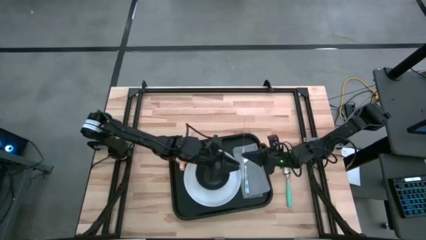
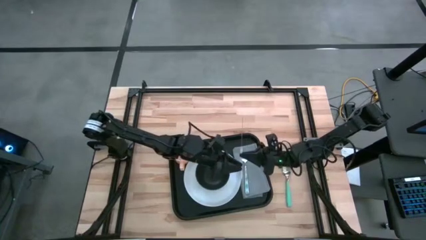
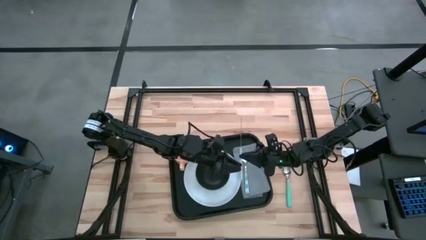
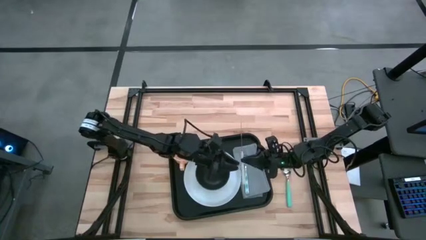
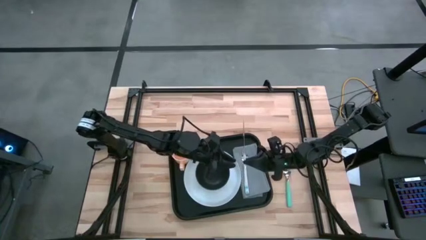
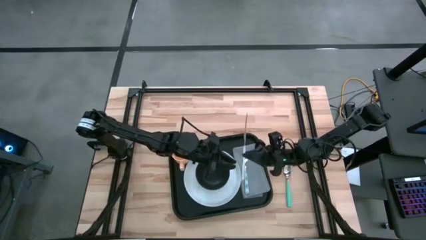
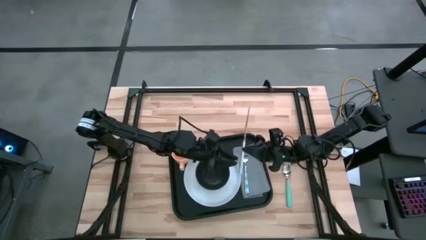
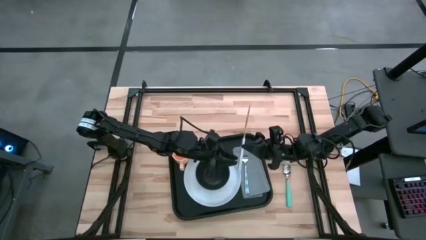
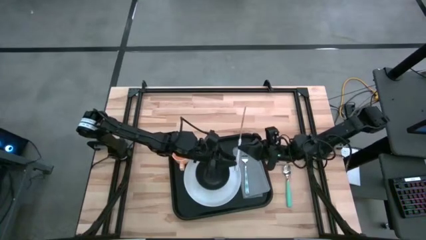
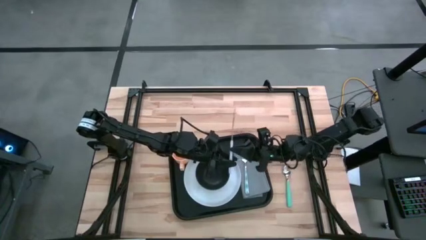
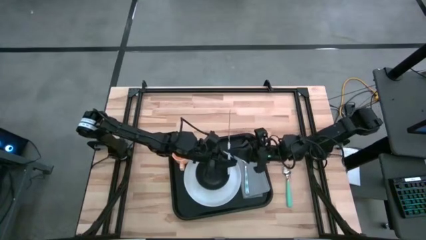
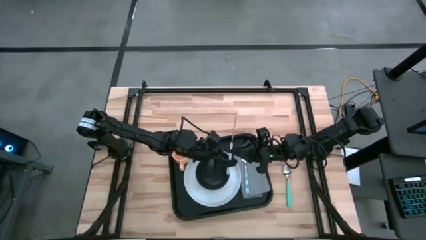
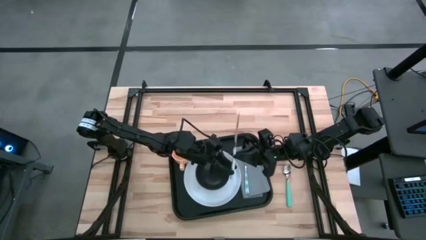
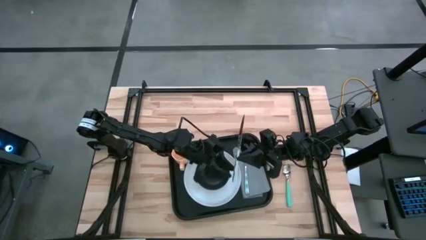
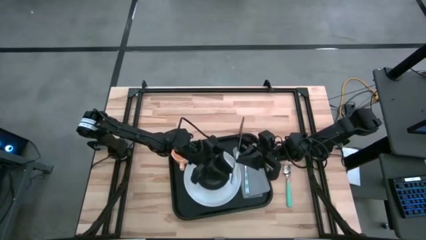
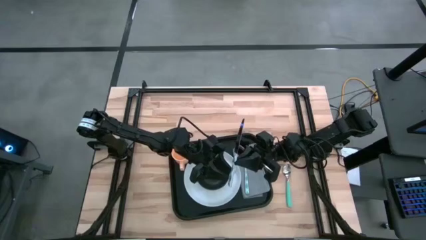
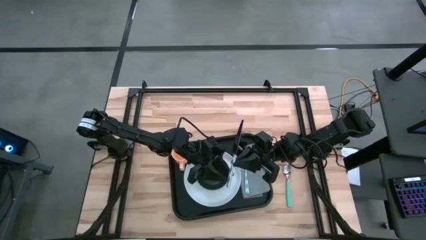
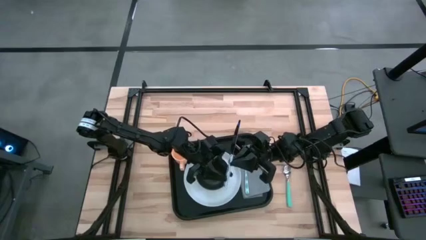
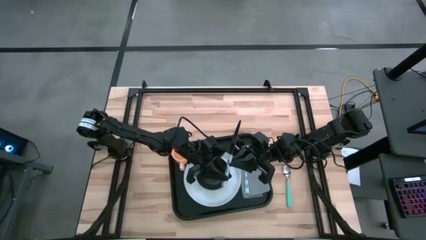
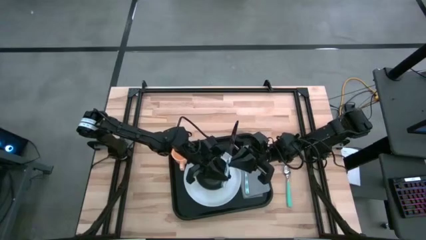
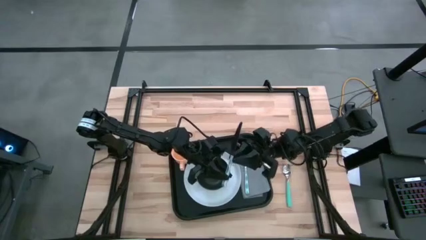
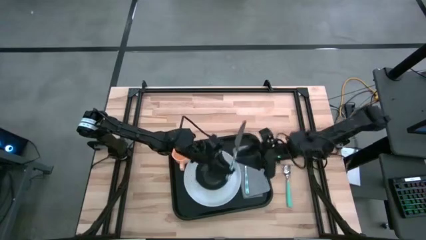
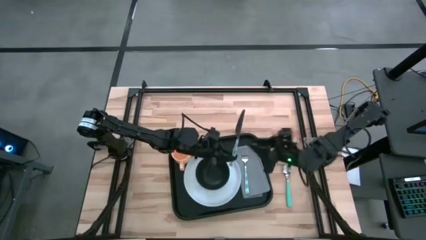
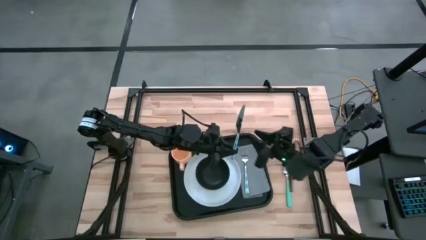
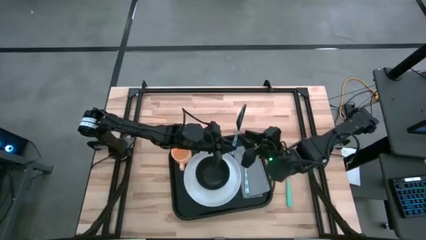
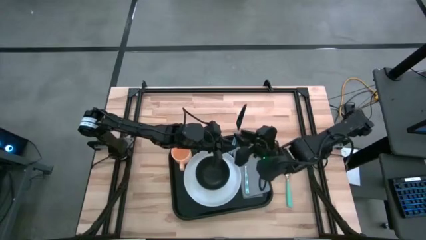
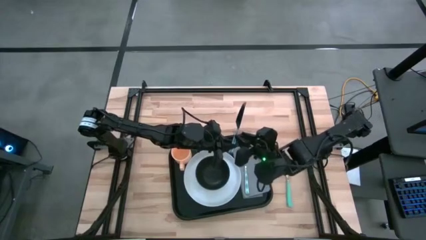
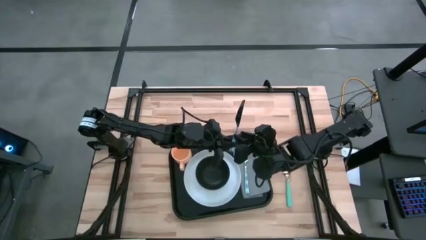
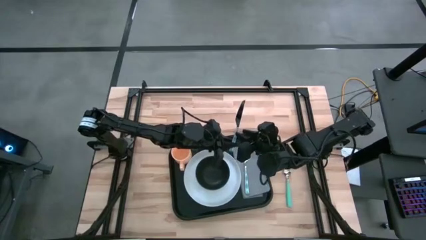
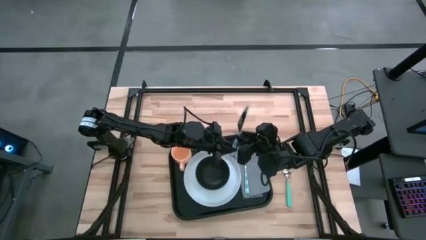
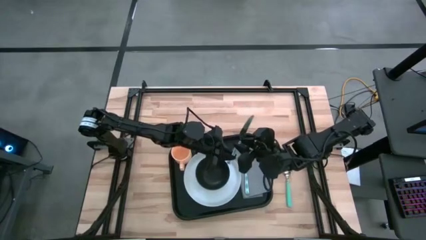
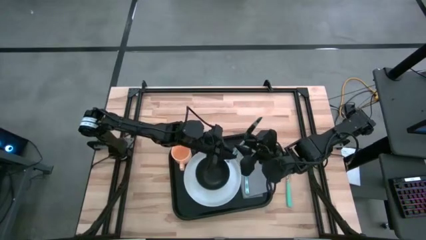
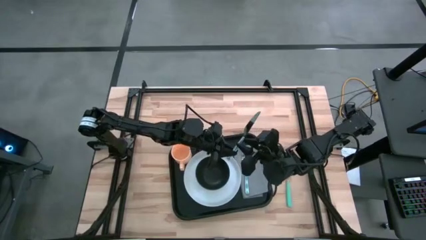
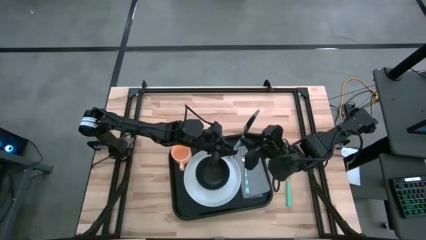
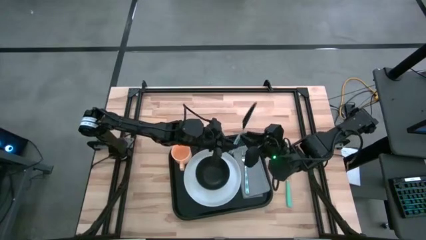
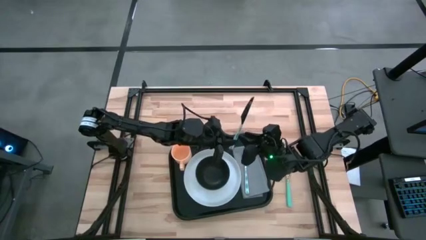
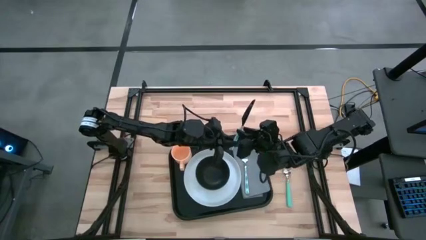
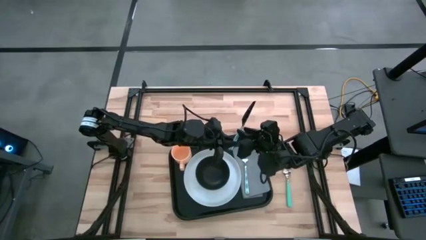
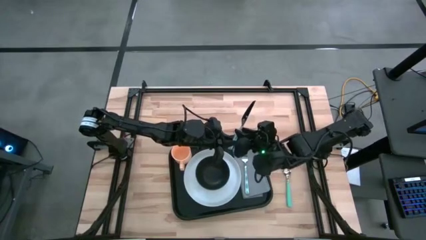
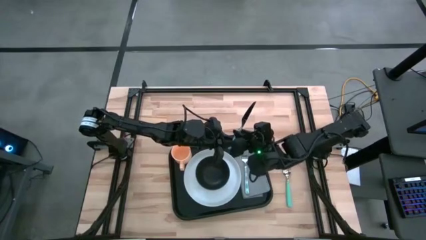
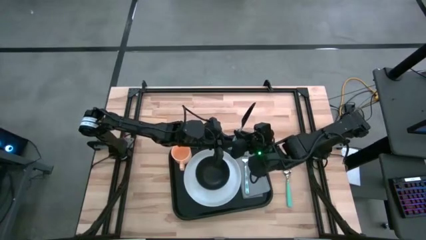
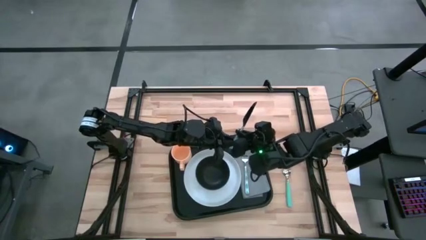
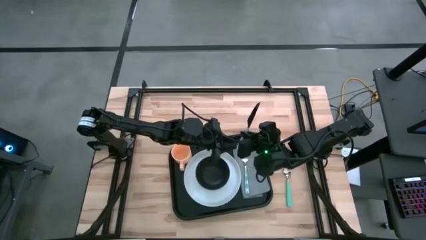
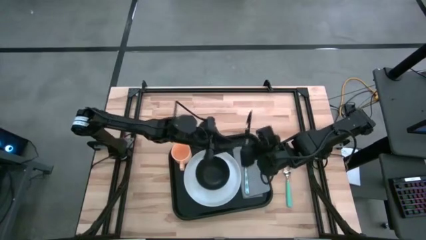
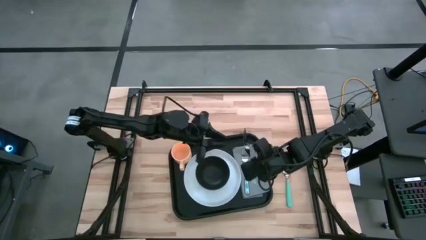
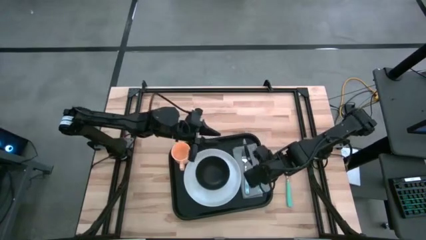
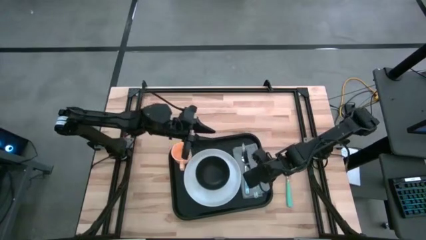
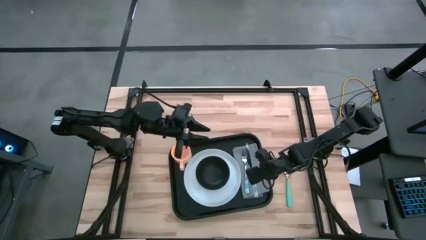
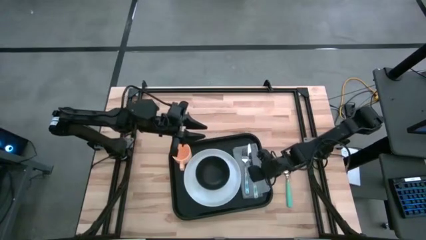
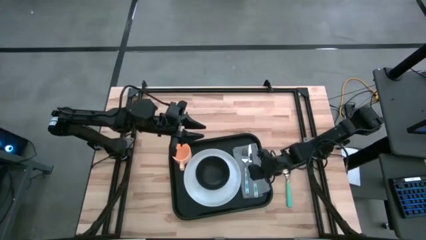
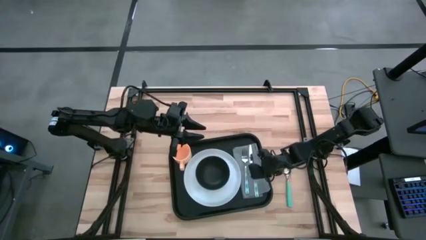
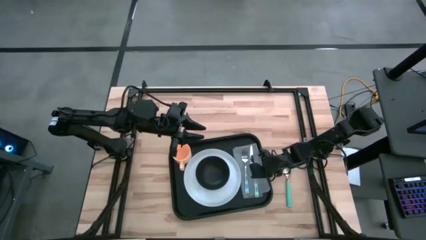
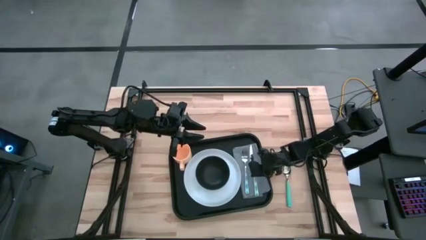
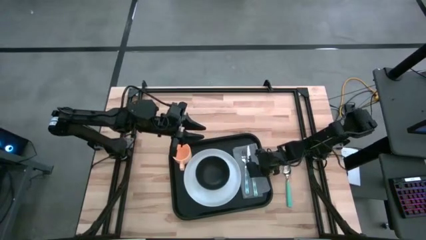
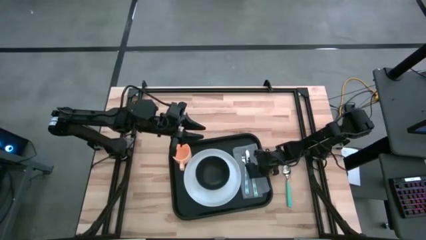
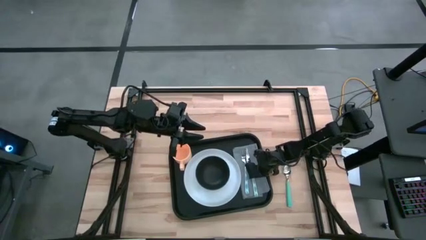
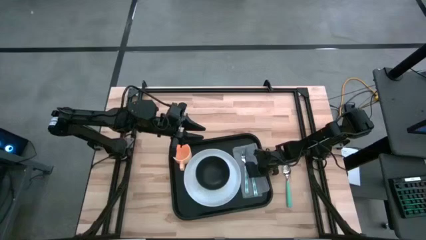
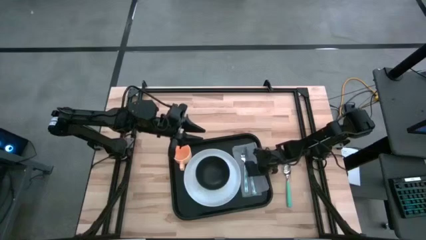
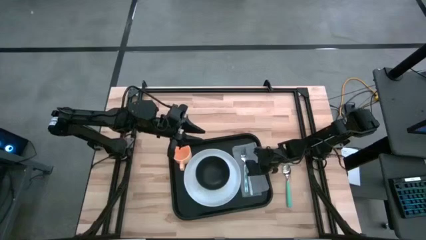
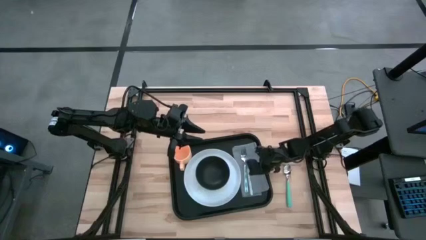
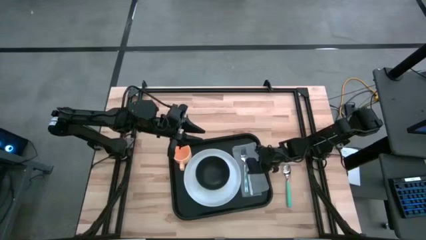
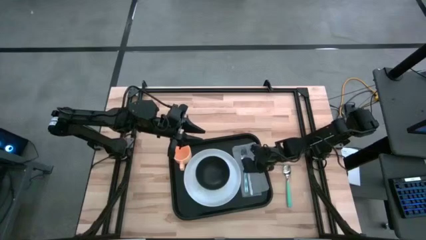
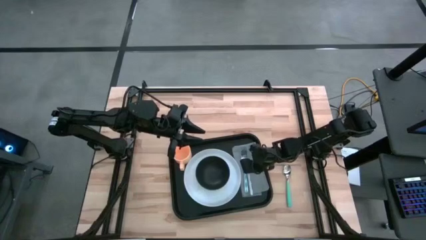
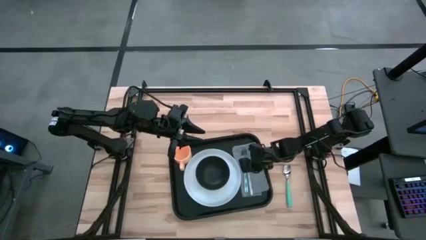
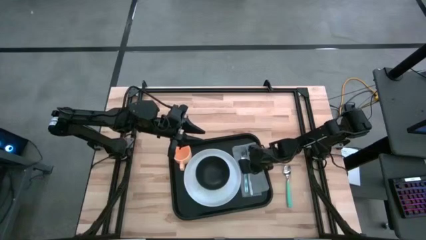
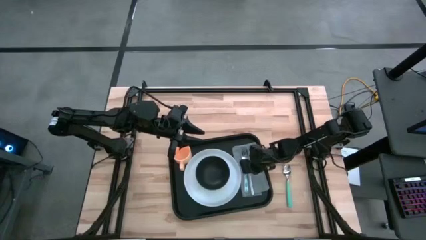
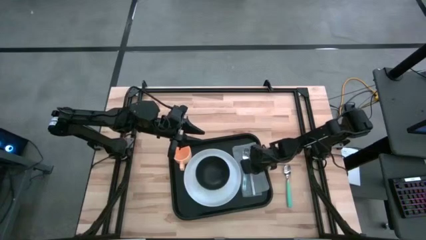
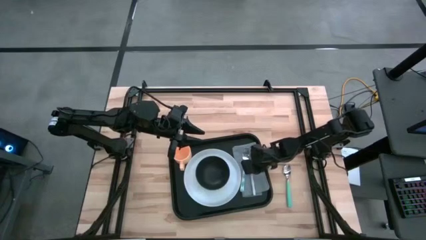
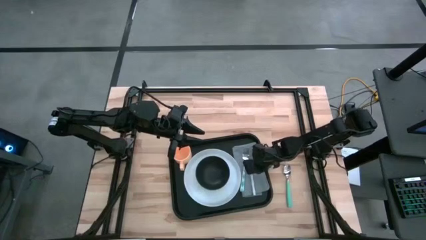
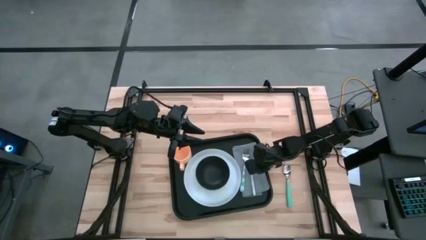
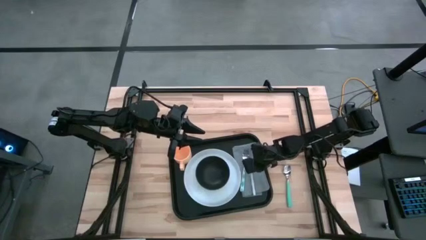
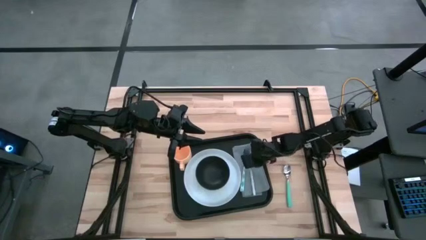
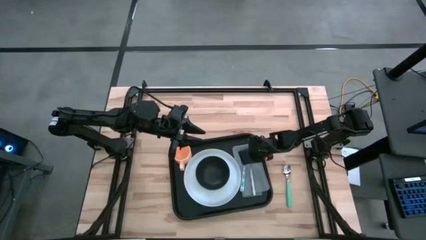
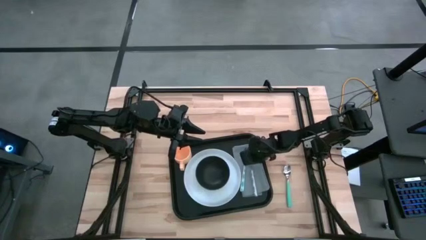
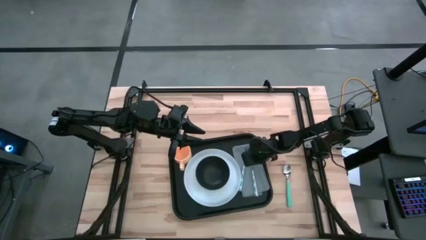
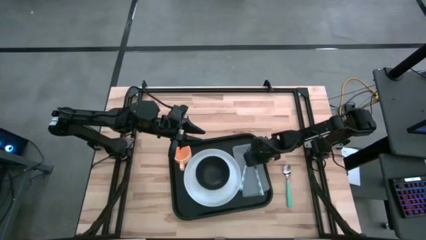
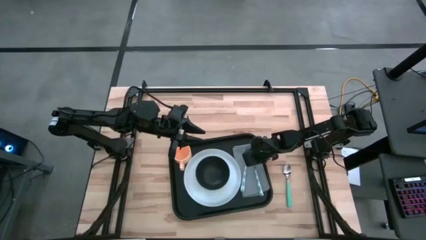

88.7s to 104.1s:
Task: Set up tray
Put the blue butter knife on the gray napkin to the right side of the blue fork

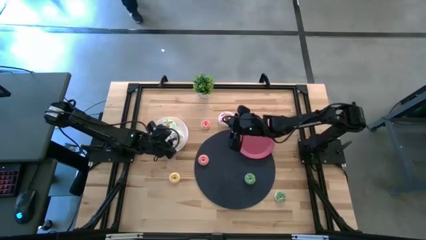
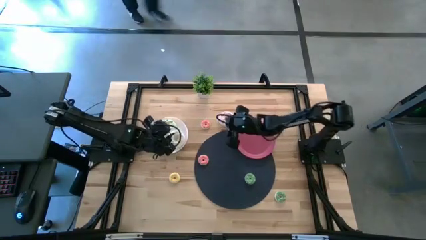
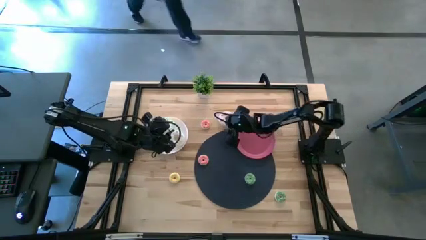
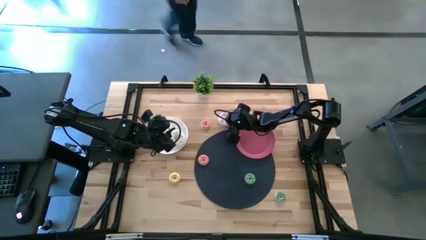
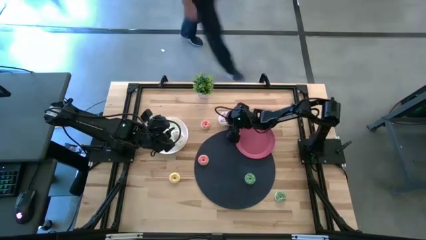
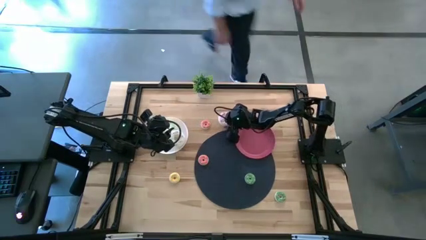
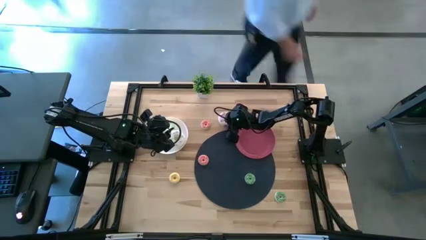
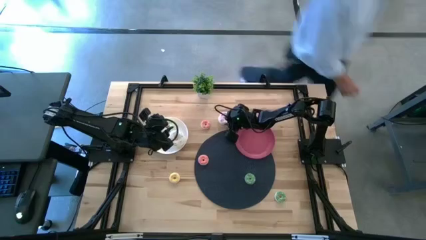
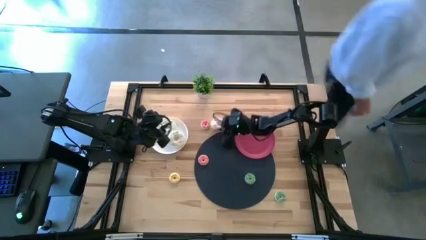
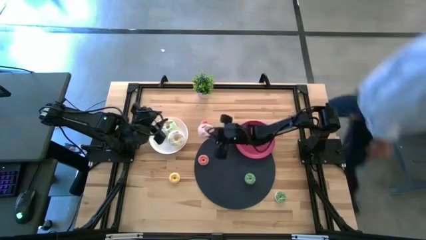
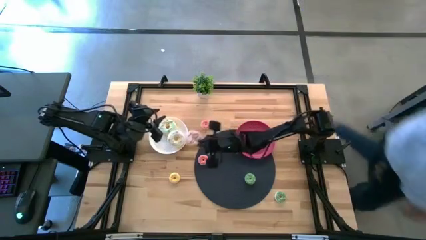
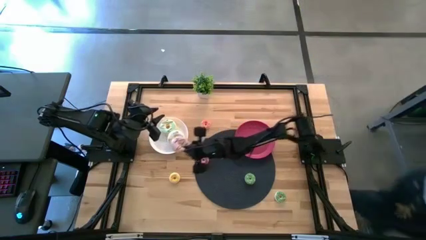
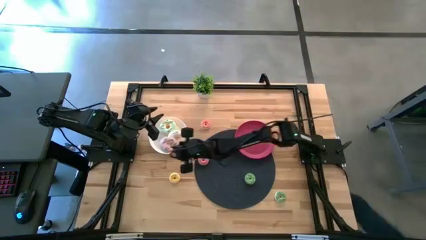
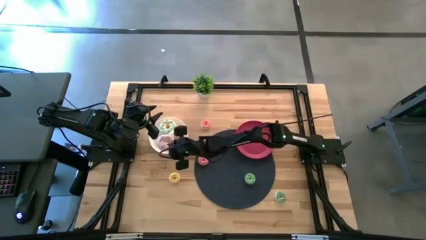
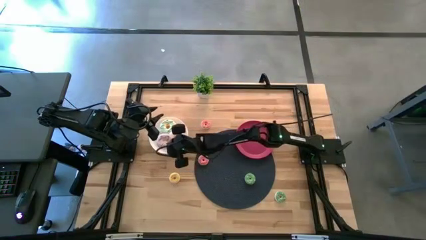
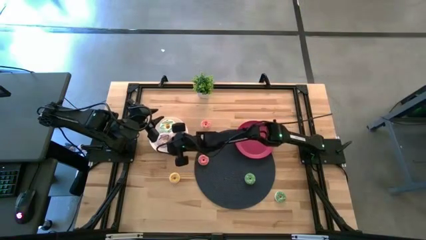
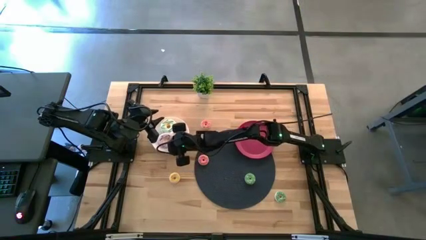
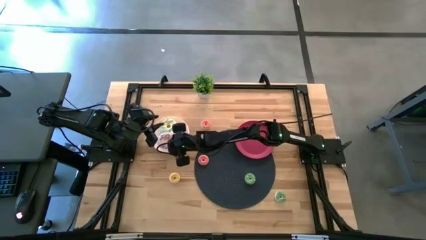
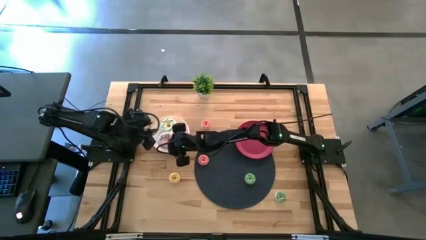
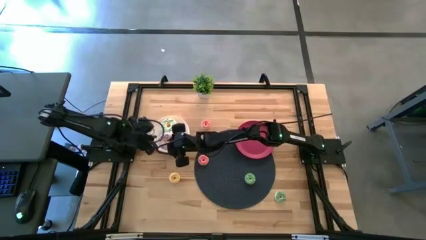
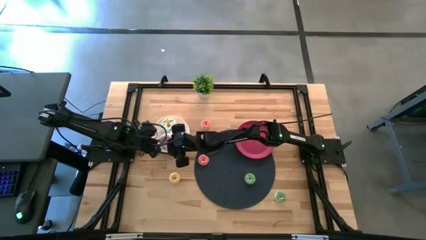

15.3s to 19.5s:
Task: Pick & Place donuts
Put the pink donut onto the white plate
